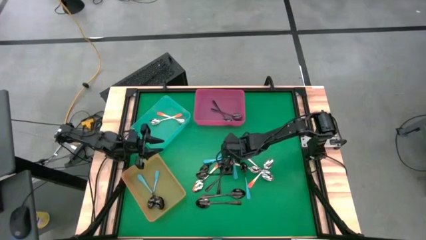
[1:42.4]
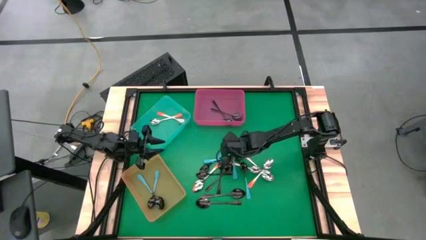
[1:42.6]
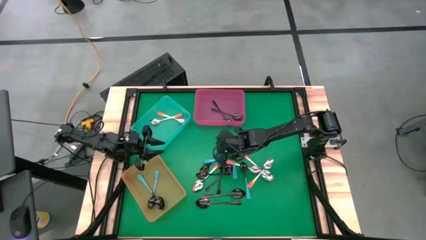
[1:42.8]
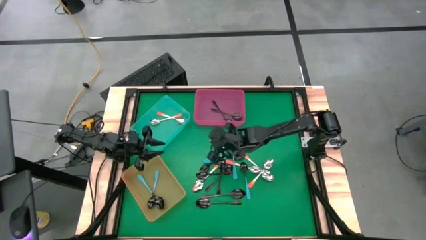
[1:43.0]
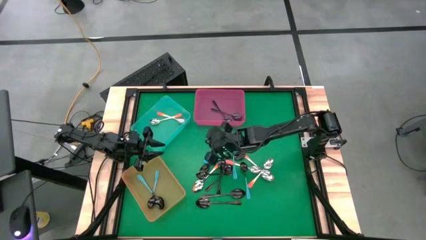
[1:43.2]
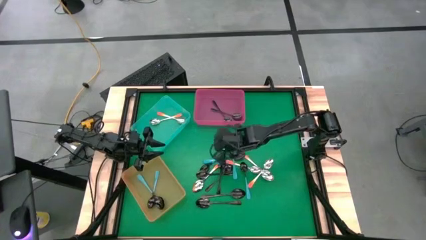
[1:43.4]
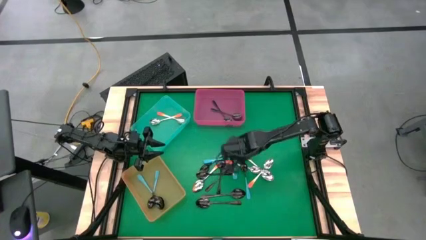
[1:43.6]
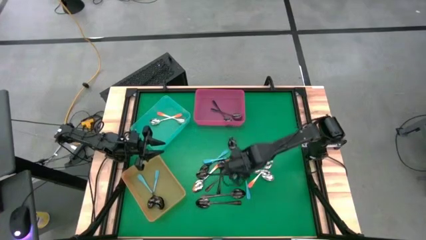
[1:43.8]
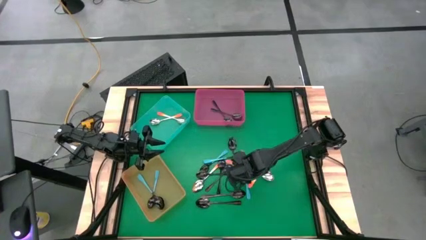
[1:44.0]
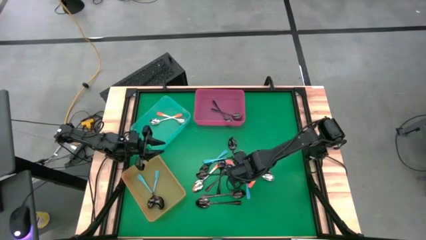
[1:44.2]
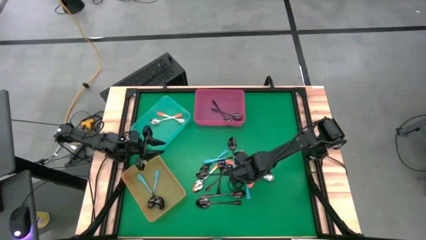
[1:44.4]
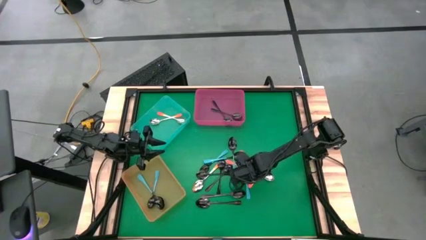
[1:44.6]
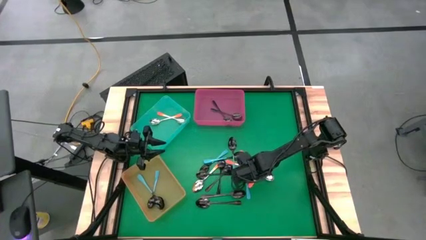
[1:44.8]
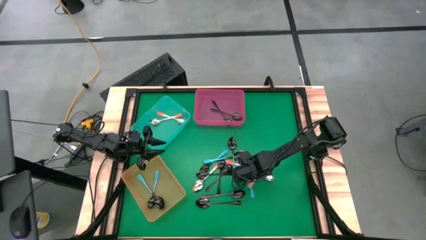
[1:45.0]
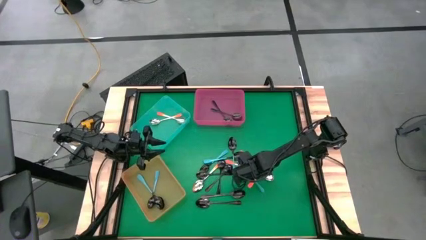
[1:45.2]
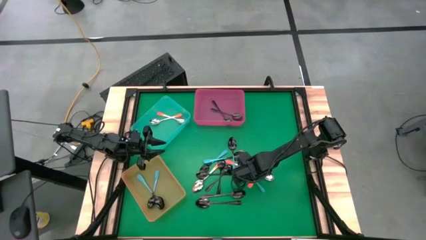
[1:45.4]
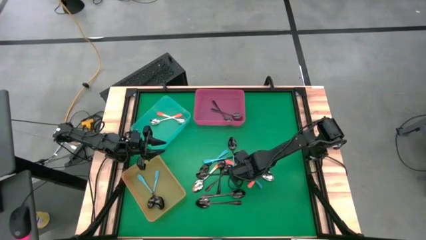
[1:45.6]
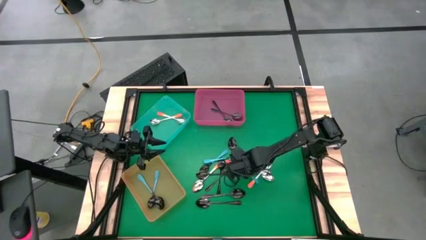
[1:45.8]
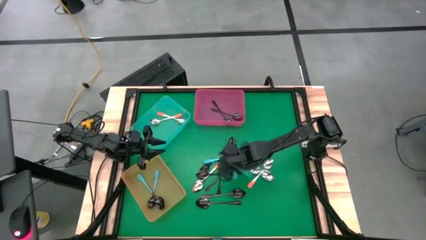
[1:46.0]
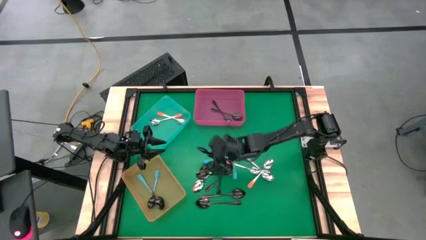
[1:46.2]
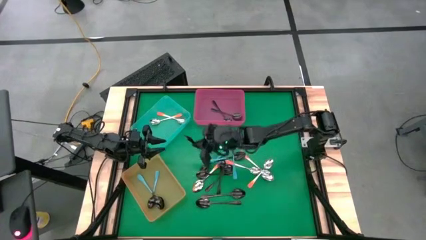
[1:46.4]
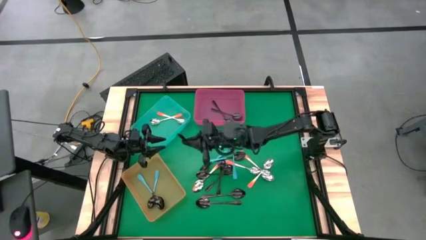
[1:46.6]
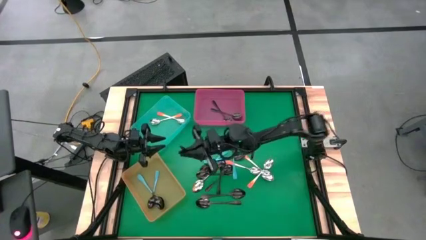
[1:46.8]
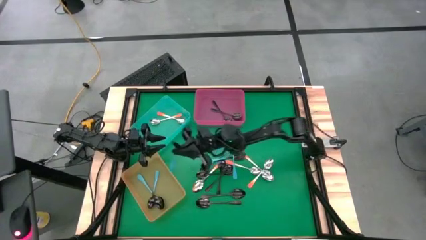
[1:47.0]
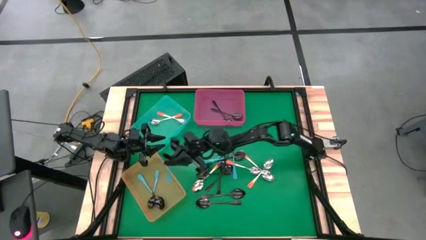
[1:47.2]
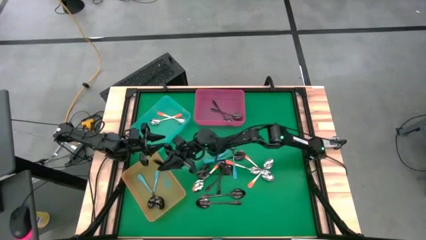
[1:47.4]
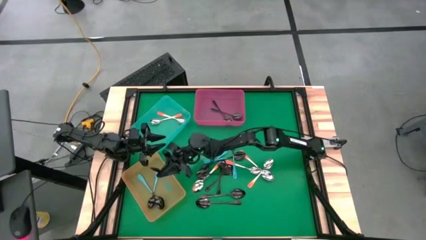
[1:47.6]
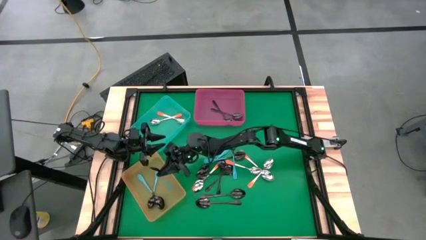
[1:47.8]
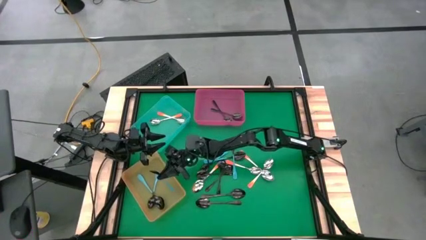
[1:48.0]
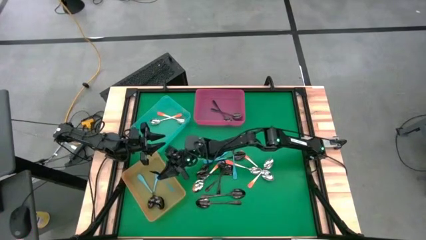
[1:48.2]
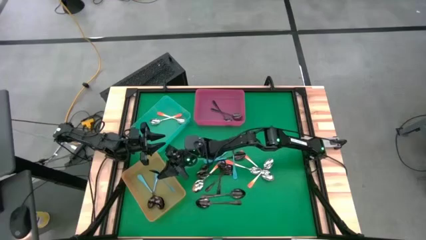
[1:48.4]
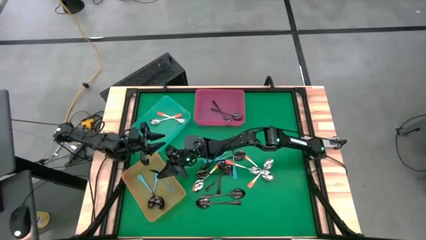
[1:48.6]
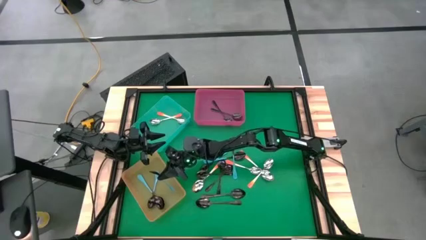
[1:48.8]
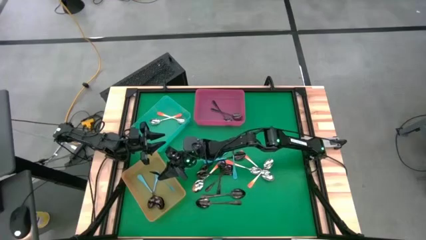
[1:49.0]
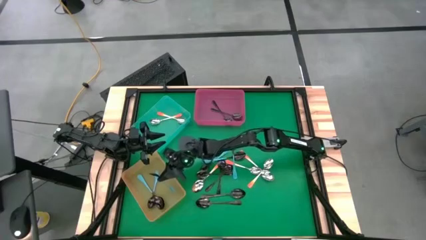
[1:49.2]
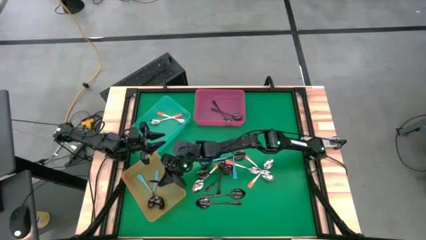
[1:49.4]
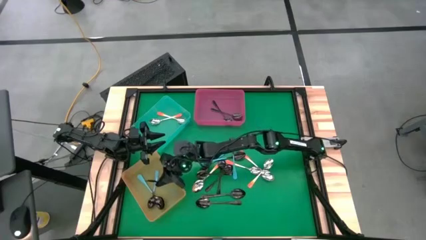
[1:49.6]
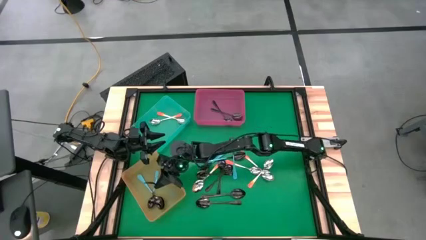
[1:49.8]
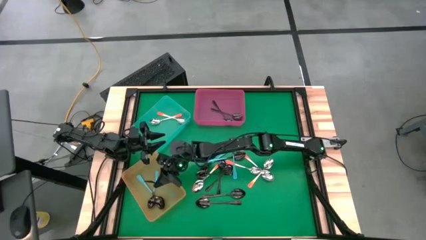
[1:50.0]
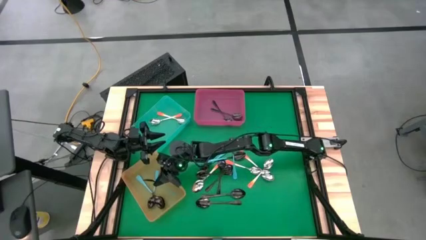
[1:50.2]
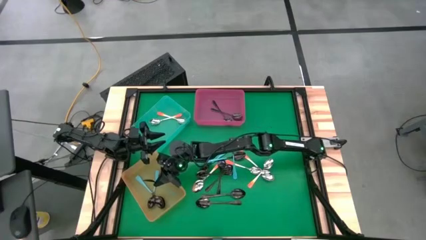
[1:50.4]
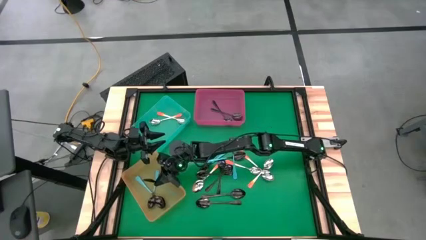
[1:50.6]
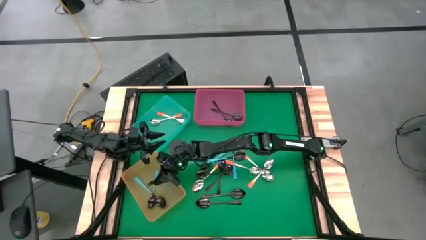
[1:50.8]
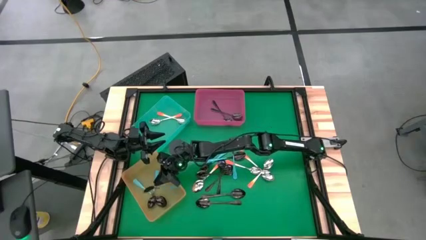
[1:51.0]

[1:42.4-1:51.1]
Task: Sort silverware by color (type)
Put the blue spoon into the orange bin

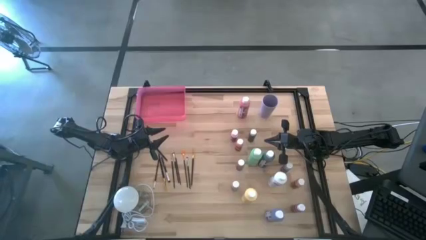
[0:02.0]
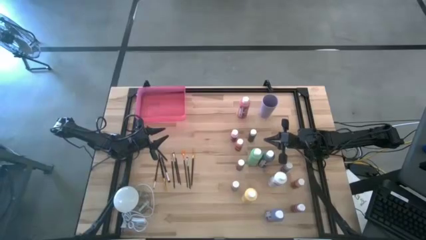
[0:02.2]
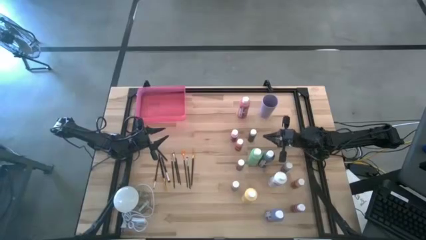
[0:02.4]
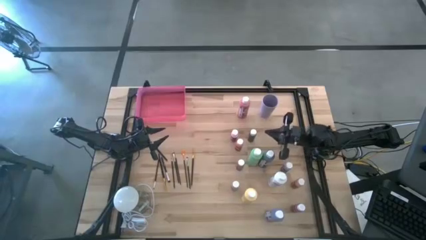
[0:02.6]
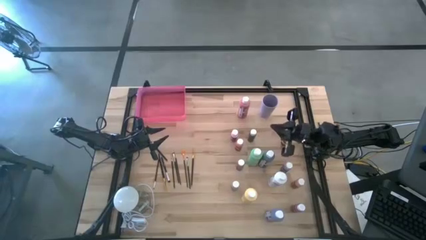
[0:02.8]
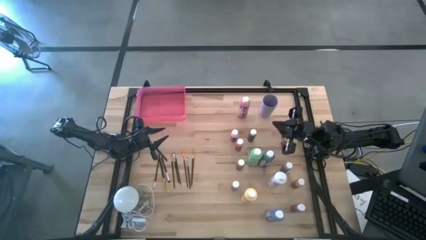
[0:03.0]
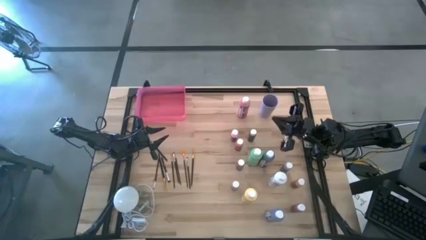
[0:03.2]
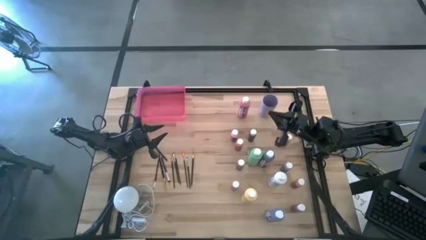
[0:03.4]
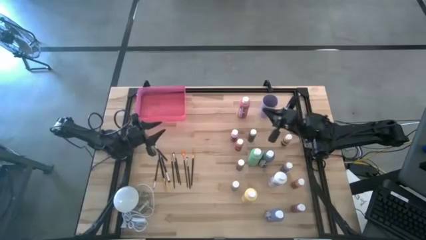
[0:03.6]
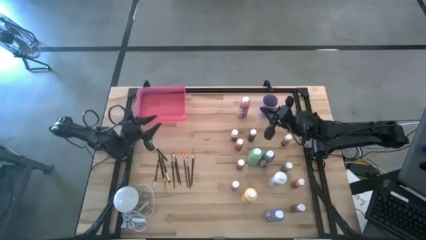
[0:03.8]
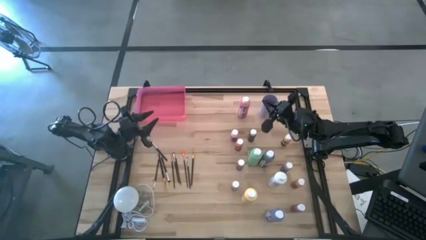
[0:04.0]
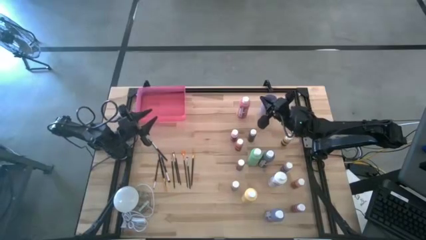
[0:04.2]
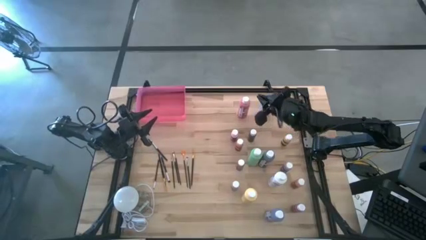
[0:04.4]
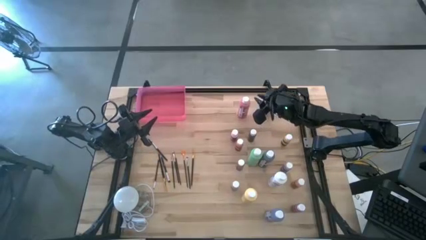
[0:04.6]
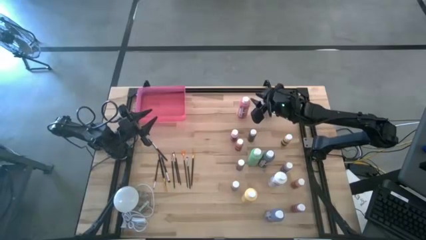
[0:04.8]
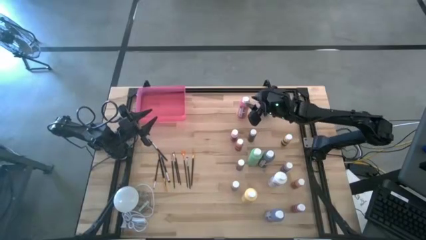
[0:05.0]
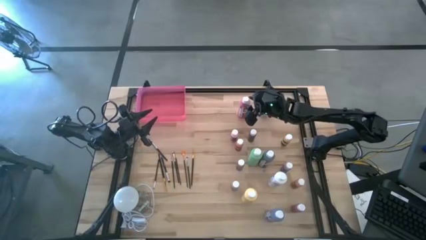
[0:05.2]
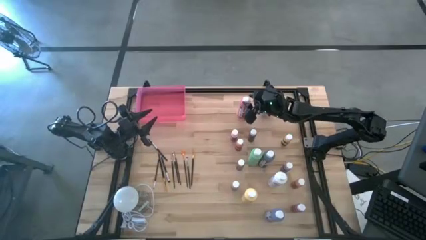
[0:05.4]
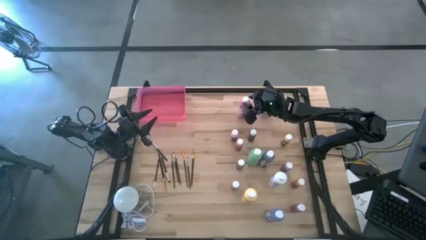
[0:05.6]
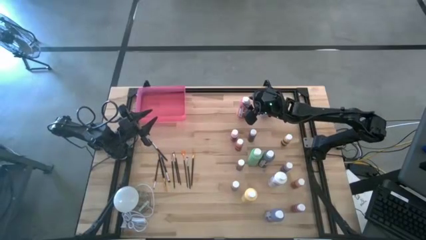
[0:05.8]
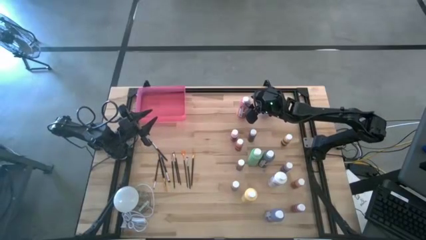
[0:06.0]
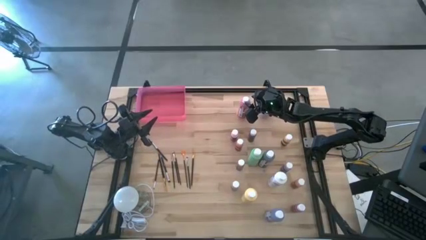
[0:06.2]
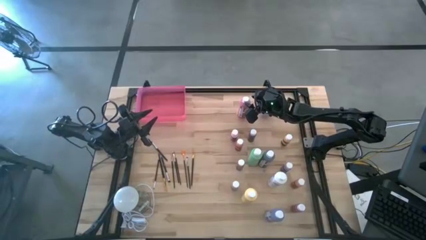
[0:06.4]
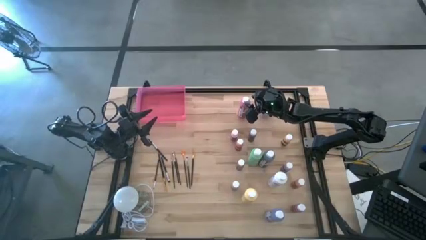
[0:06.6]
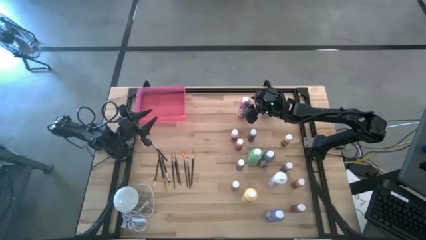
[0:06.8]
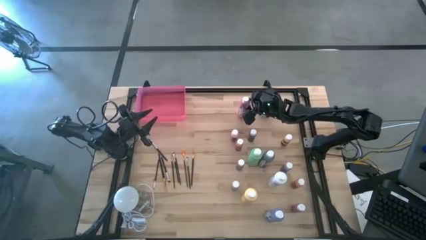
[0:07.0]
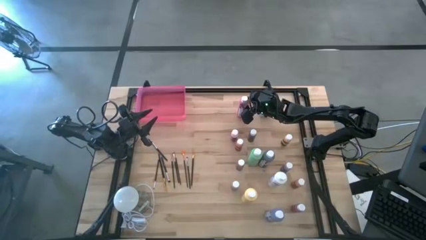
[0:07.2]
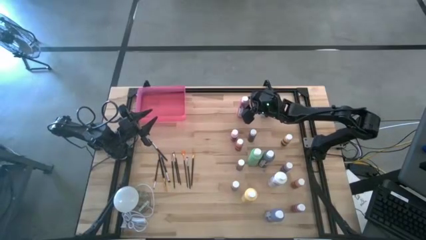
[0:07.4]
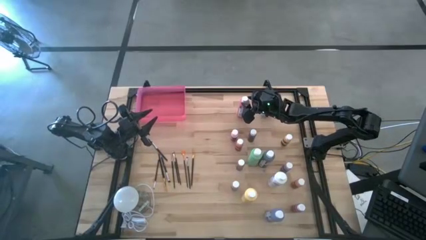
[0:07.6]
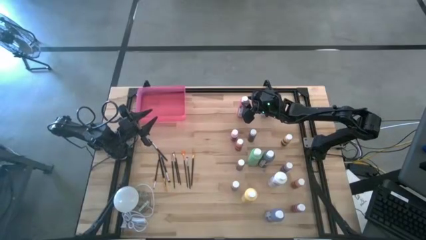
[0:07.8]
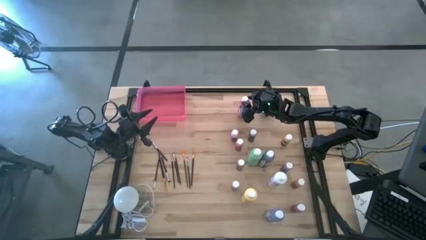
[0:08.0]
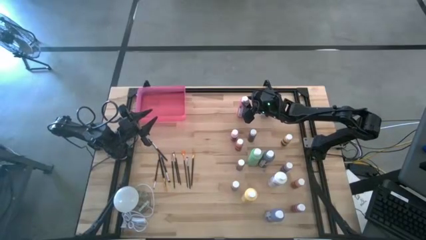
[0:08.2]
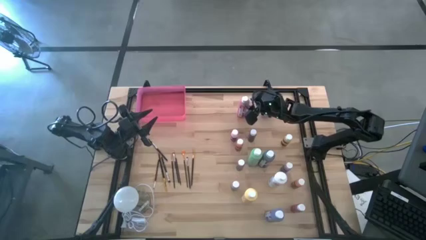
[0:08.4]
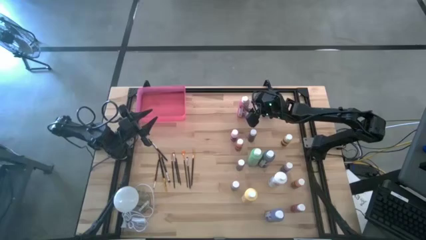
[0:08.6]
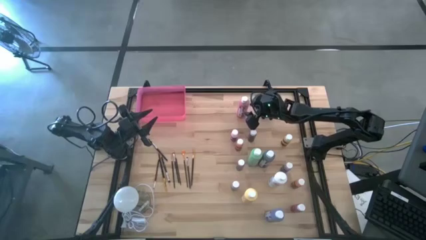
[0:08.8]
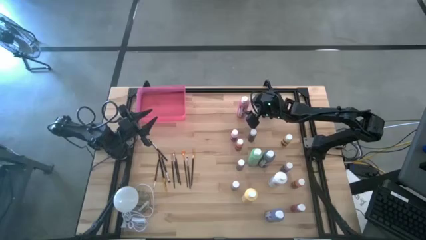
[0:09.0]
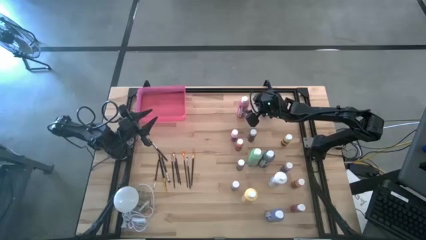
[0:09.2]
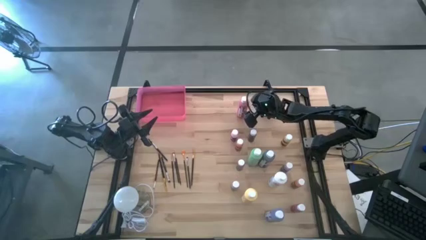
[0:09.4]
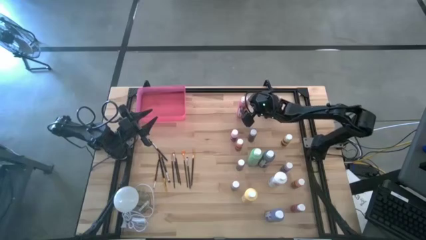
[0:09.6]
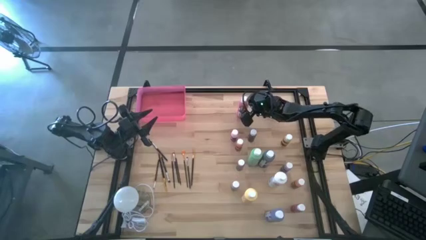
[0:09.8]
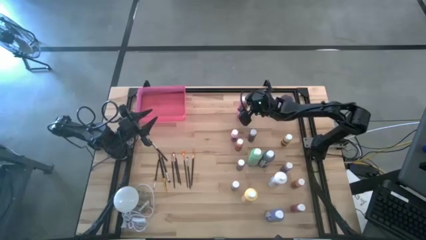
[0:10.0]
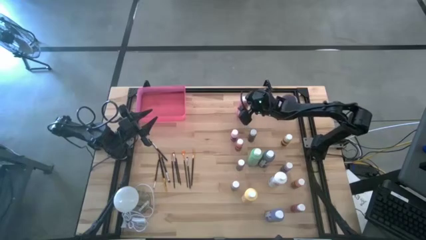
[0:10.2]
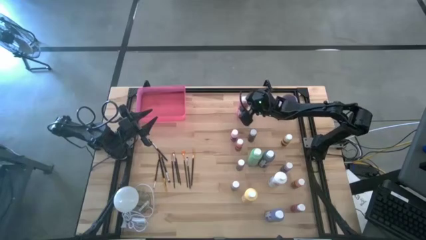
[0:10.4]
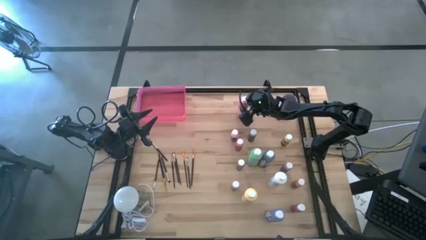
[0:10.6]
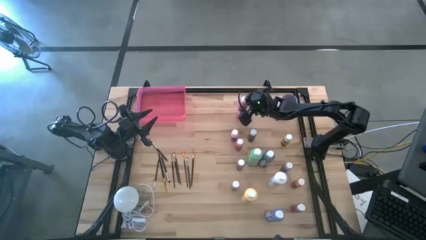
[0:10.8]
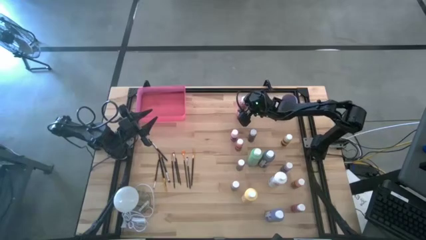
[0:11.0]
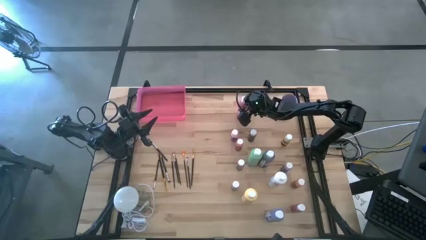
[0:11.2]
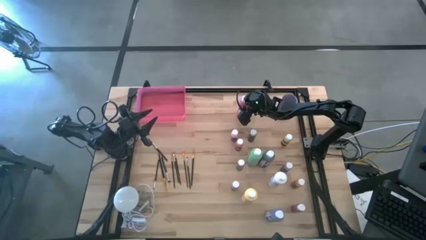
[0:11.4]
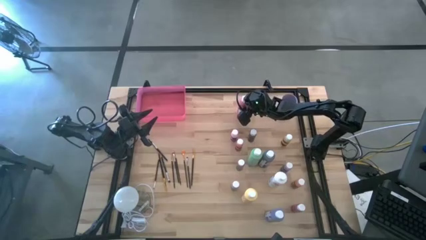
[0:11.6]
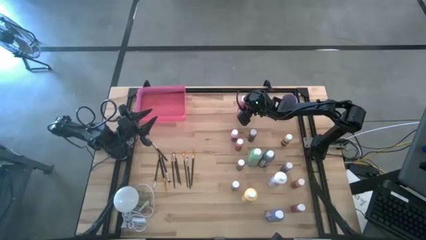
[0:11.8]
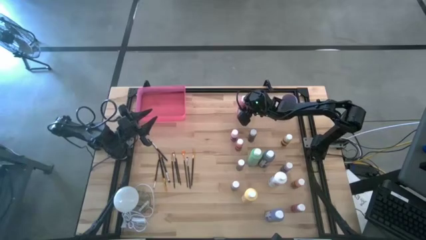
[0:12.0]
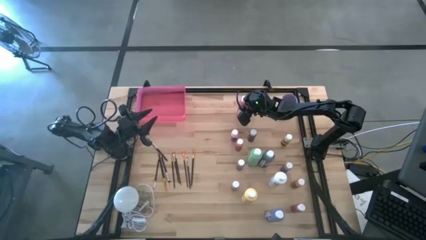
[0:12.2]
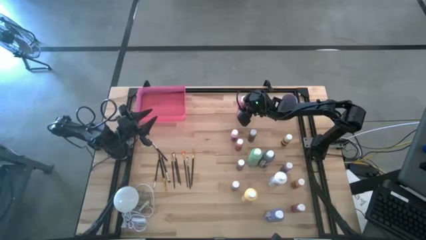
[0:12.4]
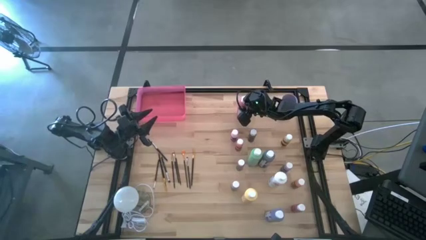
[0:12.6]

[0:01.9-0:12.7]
Task: Pick & Place Paint Supplies
Put the large pink paint bottle into the pink bin
